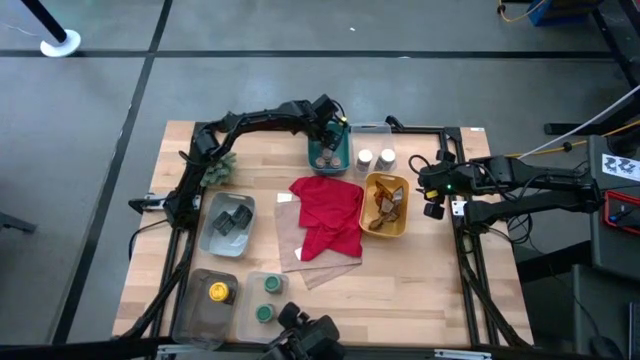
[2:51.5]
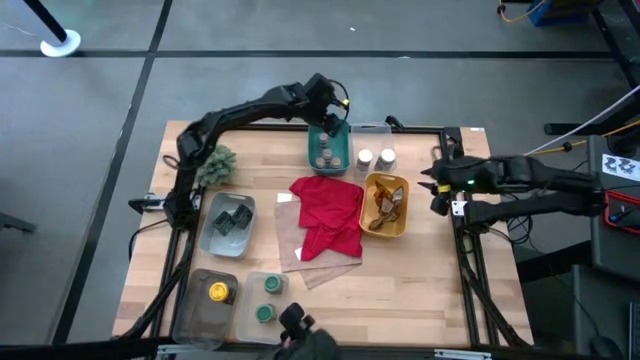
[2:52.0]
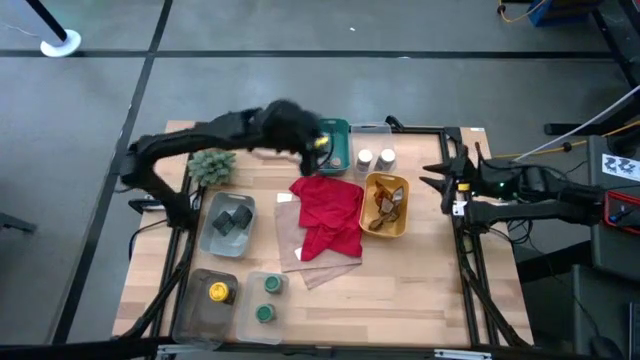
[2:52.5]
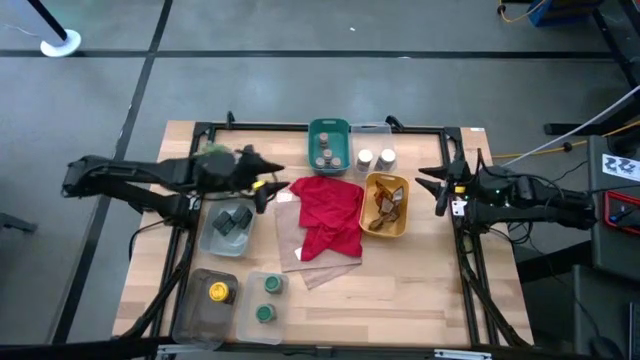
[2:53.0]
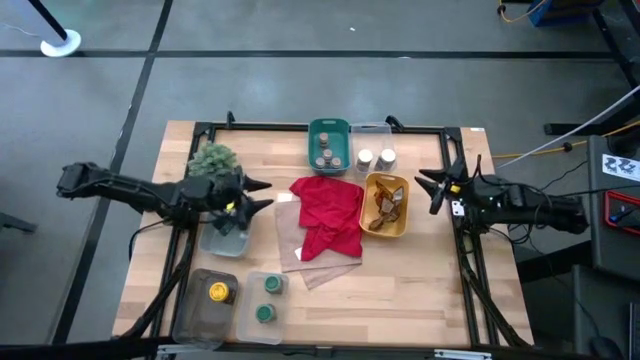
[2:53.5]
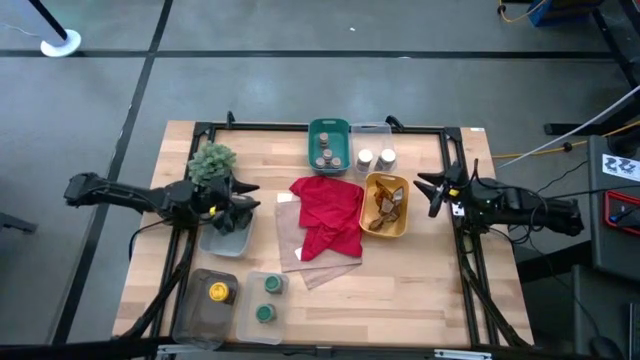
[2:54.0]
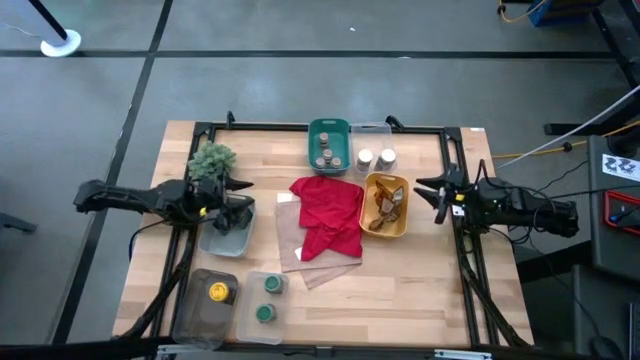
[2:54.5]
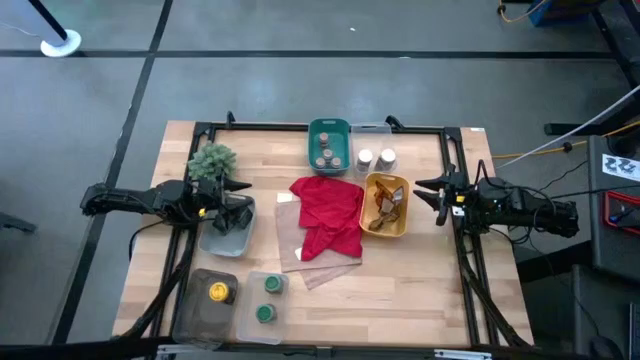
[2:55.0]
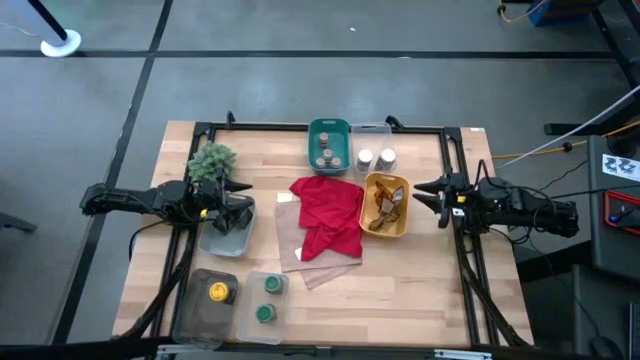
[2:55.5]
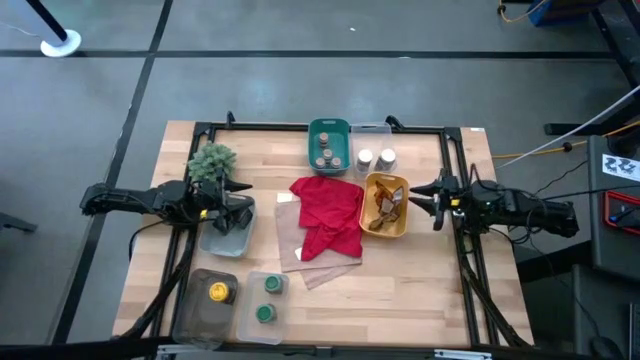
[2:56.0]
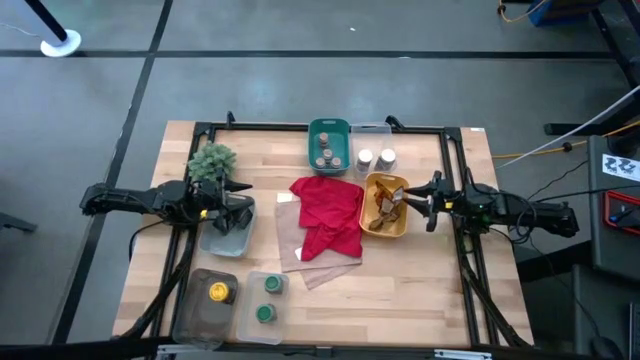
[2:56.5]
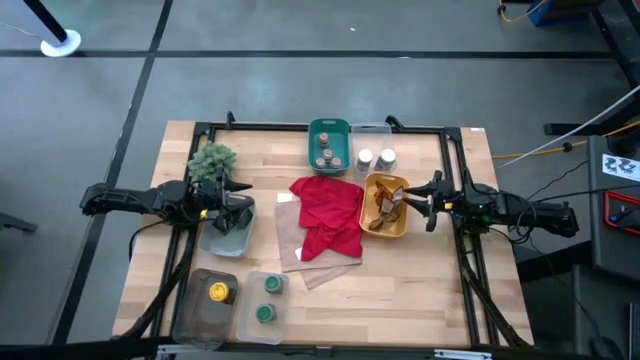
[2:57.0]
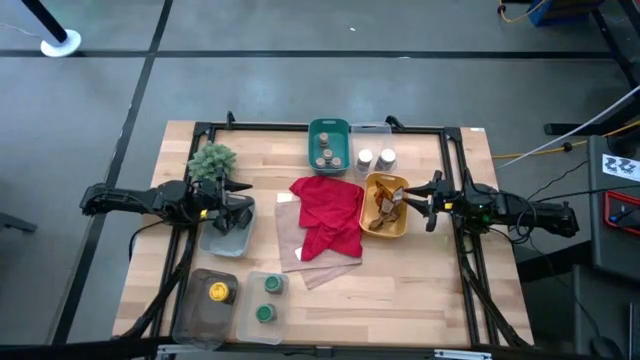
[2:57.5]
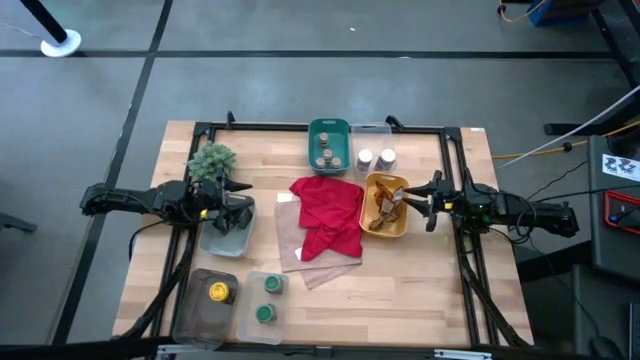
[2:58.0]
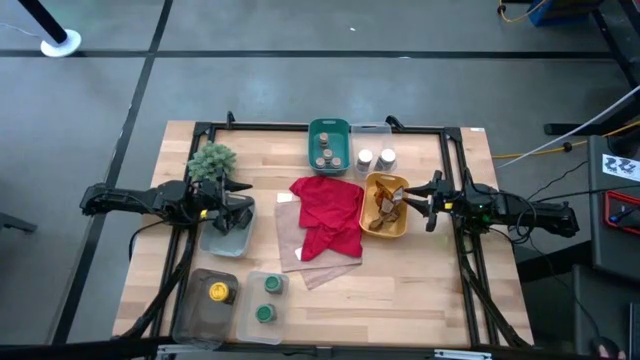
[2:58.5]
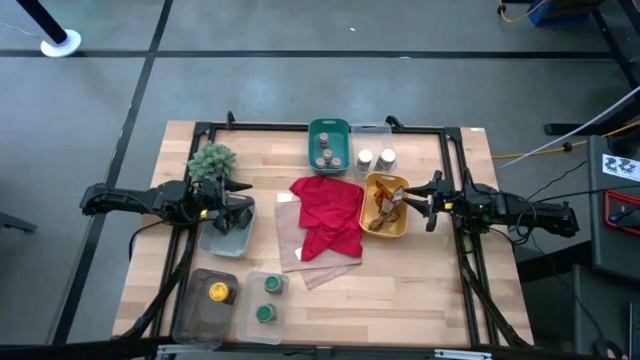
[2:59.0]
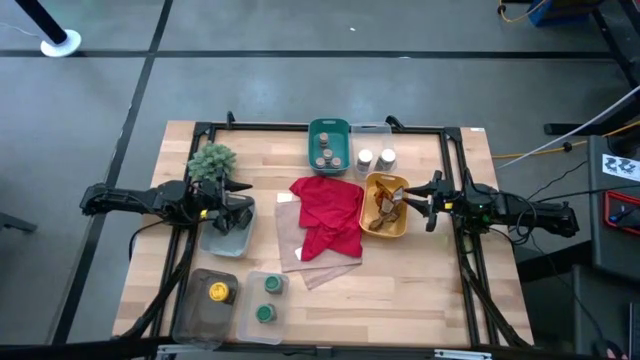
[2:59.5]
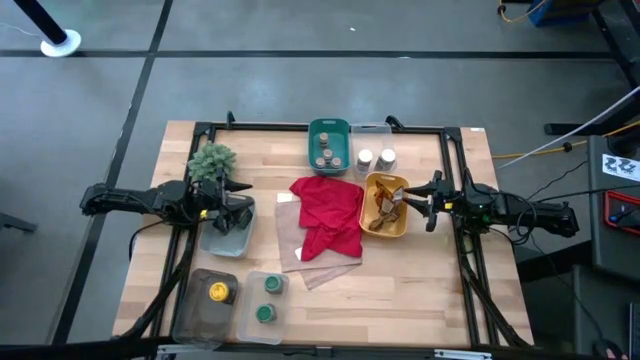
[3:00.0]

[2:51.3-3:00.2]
Task: Sort spices by type
Return to Home Position

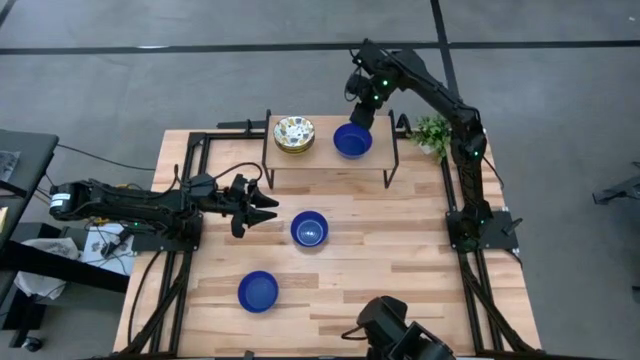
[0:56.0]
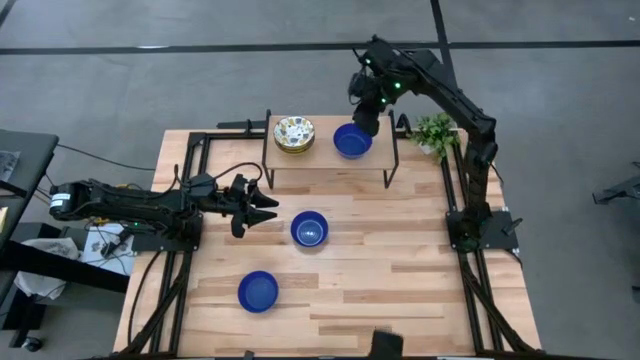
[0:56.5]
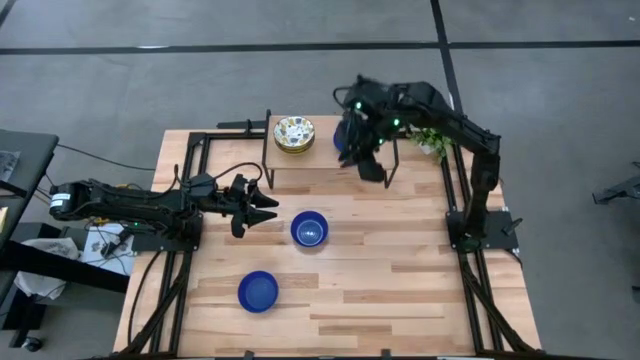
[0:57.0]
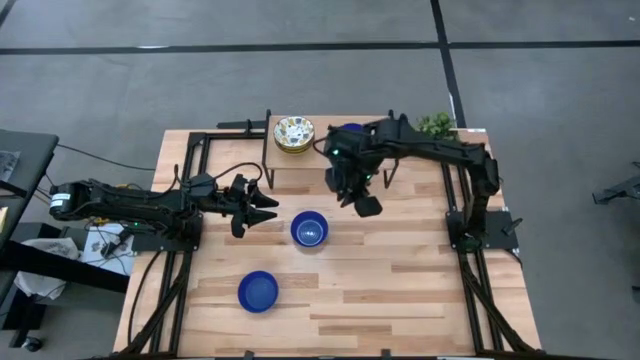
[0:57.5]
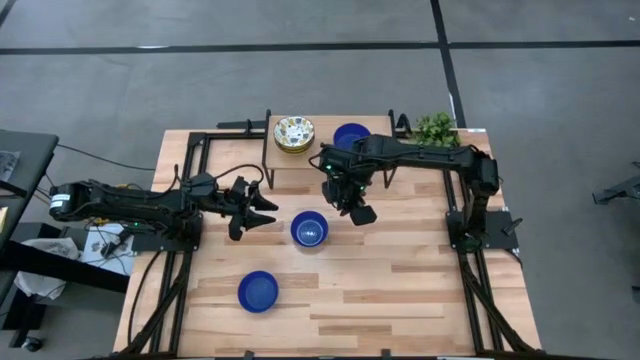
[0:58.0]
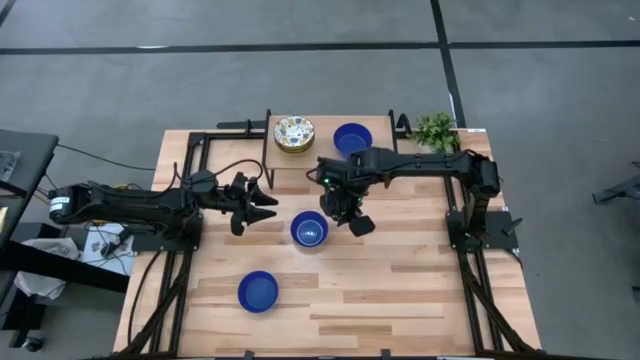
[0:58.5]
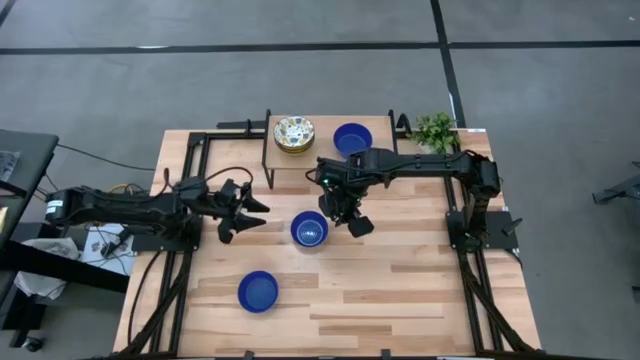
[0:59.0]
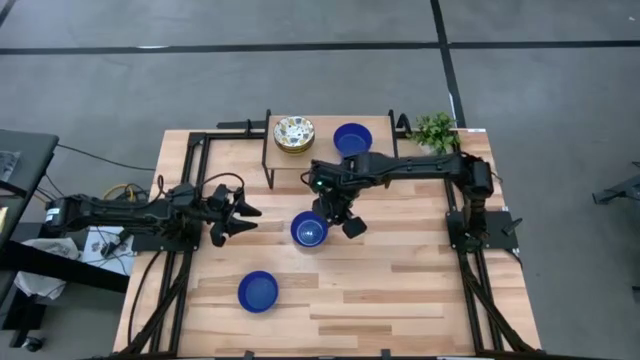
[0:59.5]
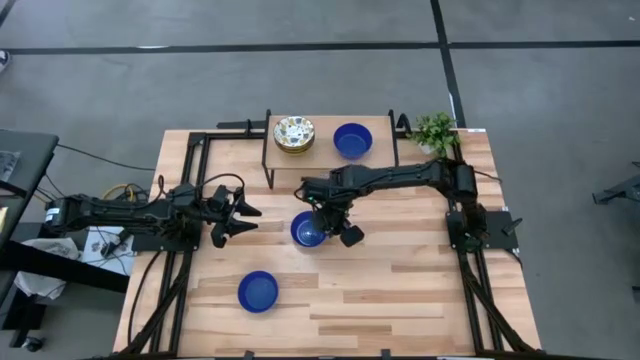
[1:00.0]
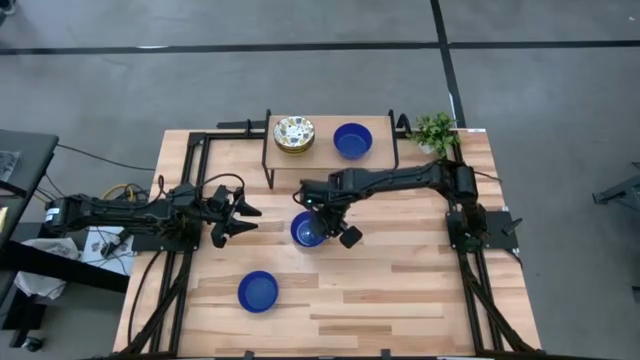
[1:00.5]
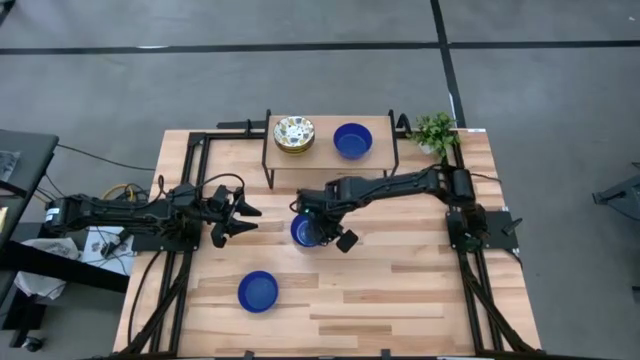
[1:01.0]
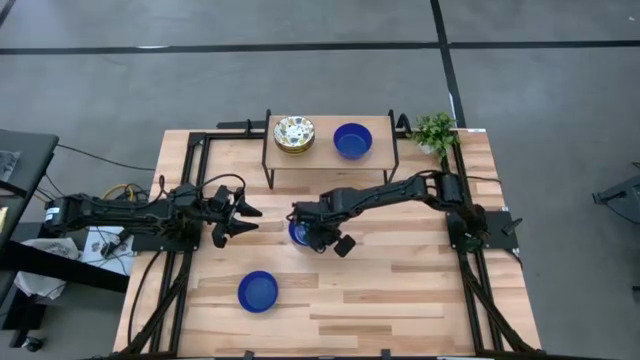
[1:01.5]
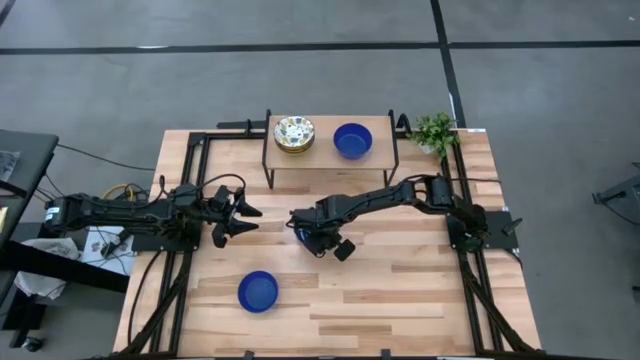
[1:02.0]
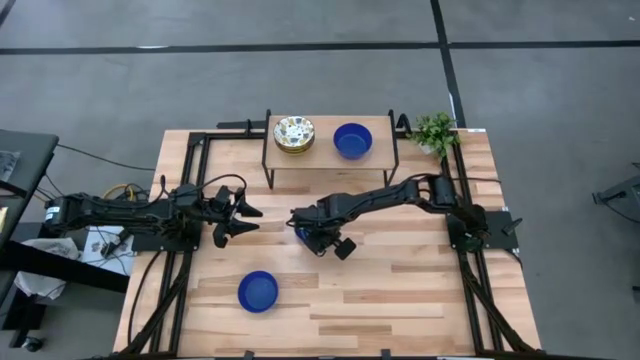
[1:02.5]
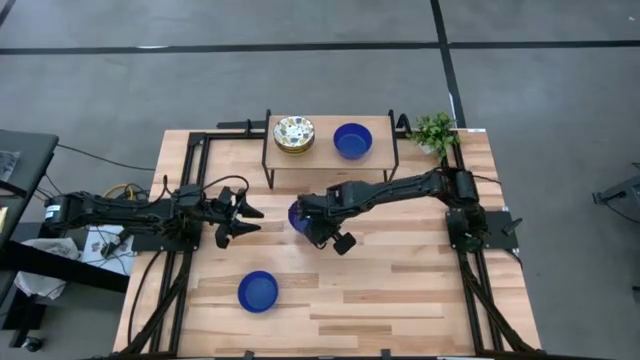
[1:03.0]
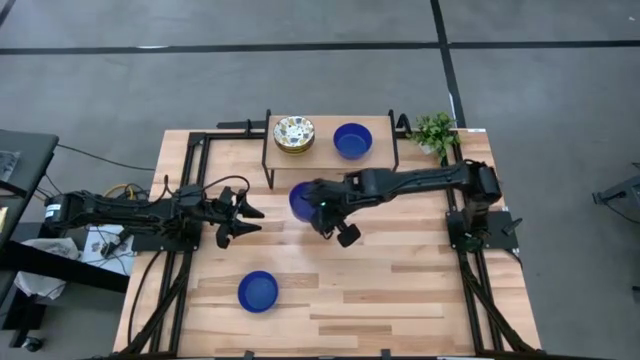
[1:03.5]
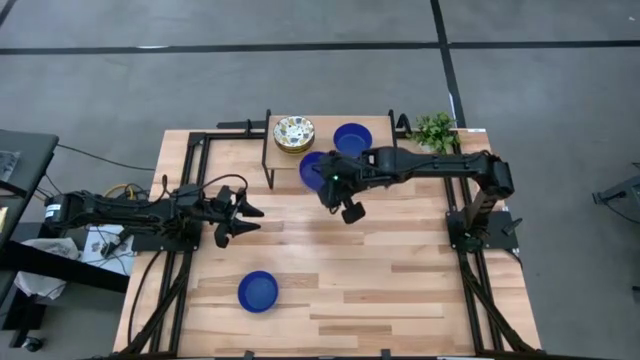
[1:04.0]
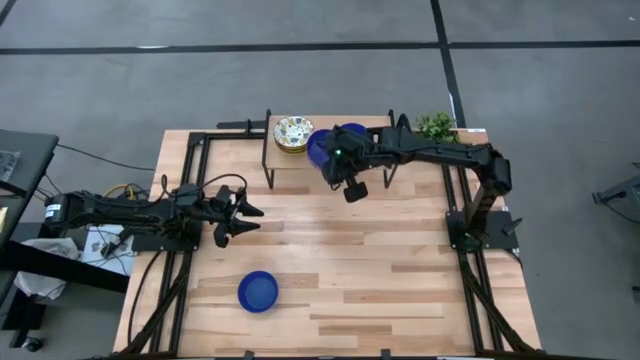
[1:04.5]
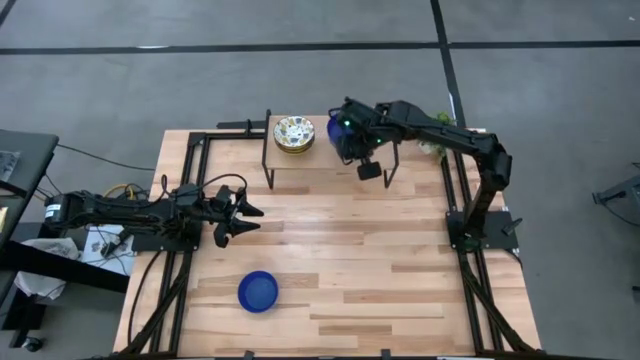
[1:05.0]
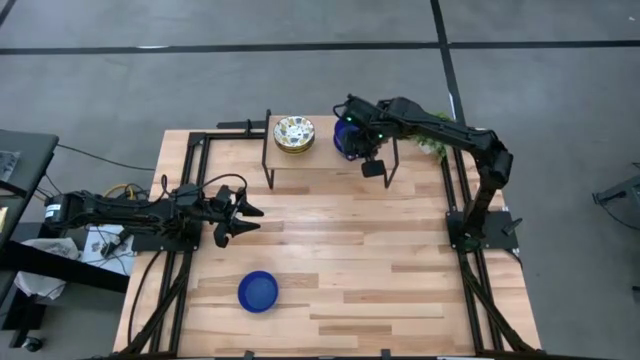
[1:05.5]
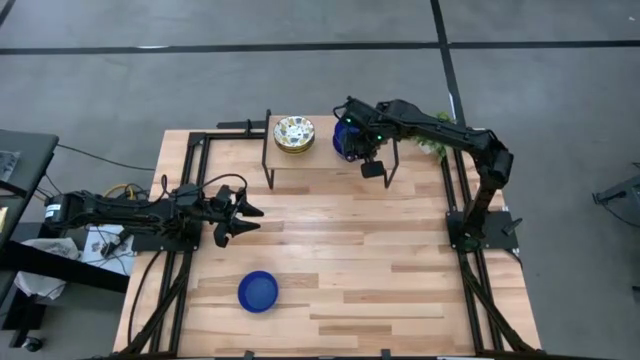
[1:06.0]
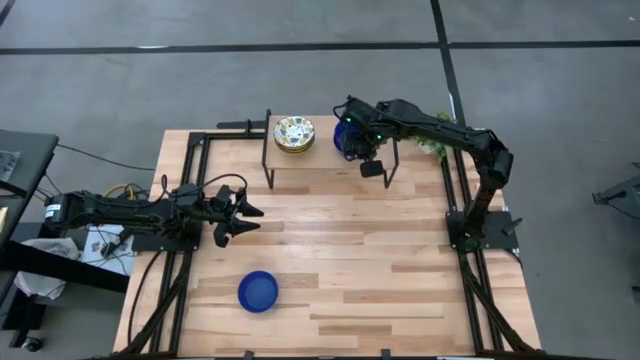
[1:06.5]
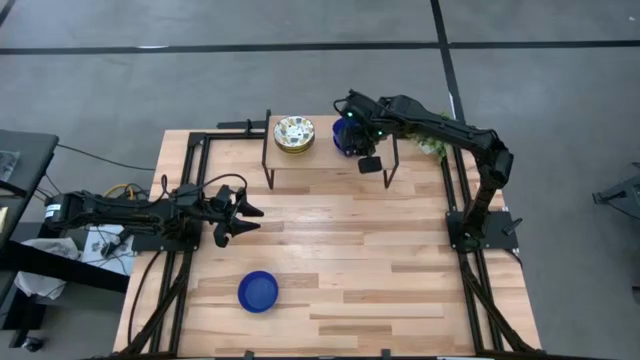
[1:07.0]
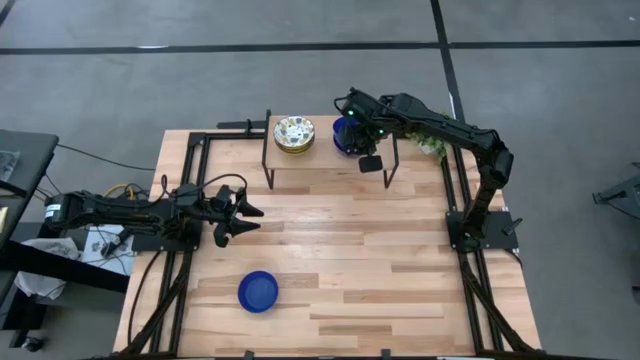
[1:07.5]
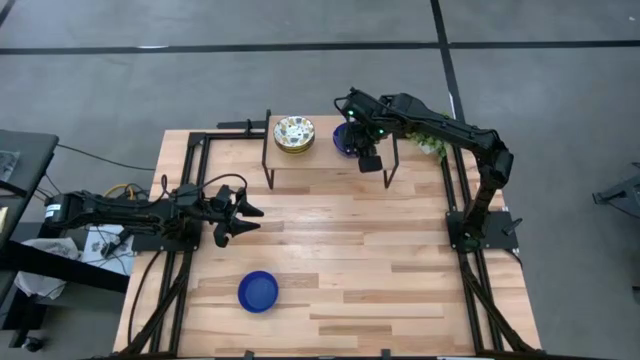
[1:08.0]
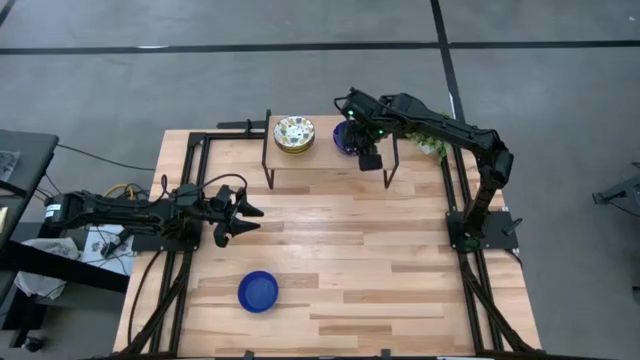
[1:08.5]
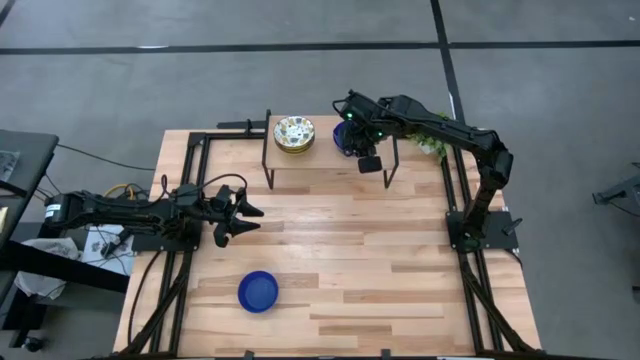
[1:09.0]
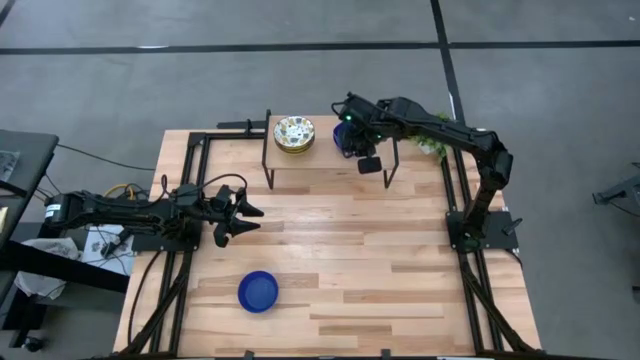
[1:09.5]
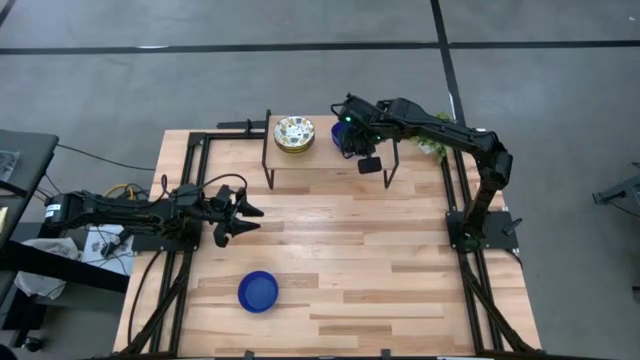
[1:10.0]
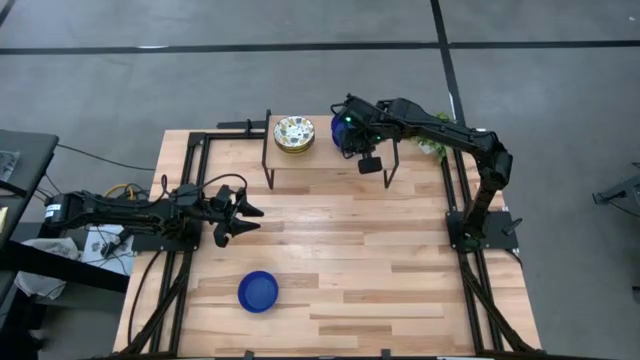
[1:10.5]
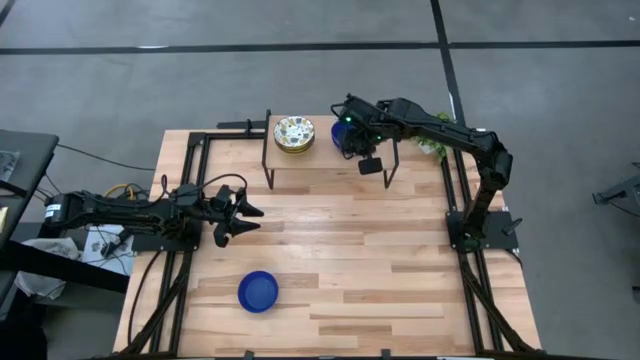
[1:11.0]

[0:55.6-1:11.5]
Task: Pick & Place Mini bowls
Stack the top blue bowl on top of the blue bowl on the shelf
